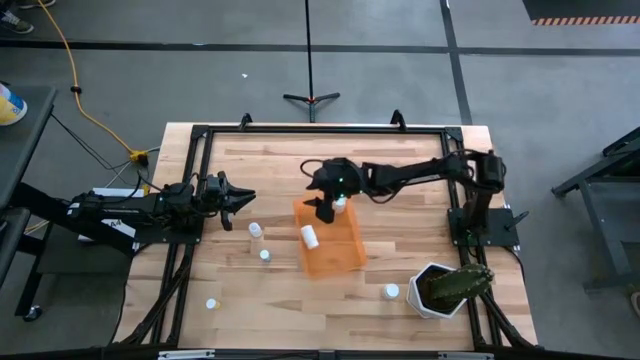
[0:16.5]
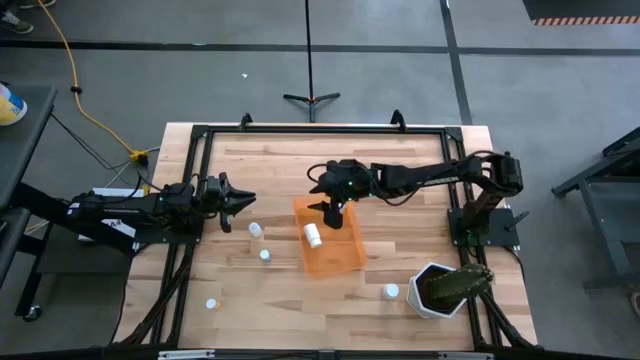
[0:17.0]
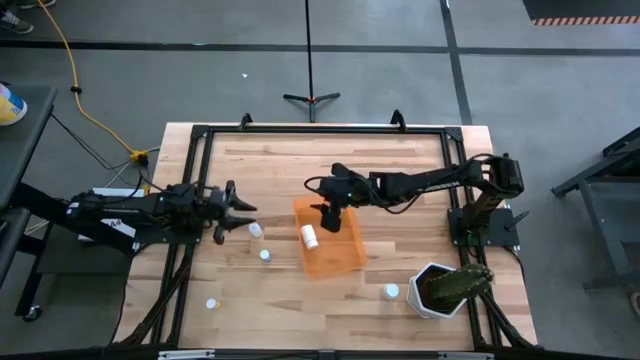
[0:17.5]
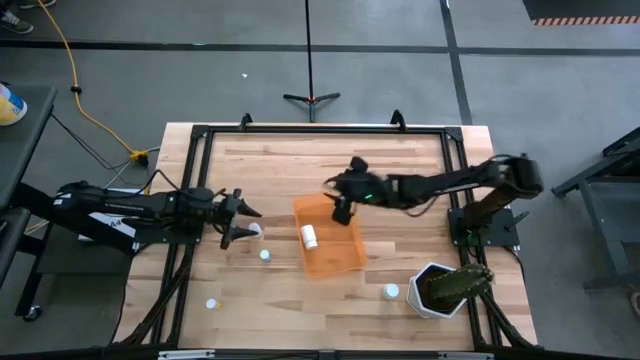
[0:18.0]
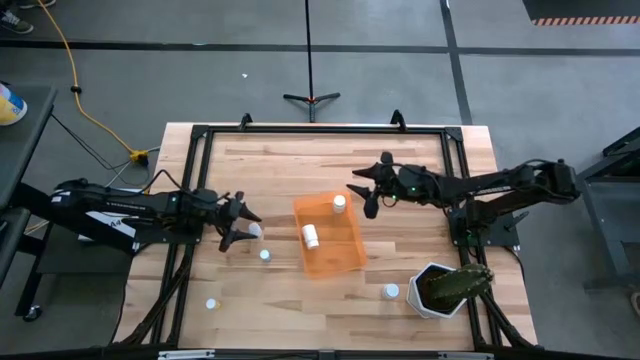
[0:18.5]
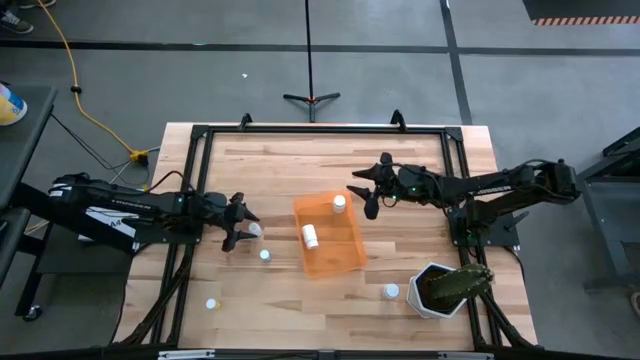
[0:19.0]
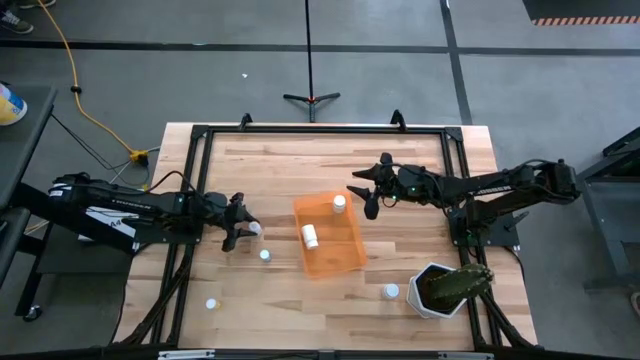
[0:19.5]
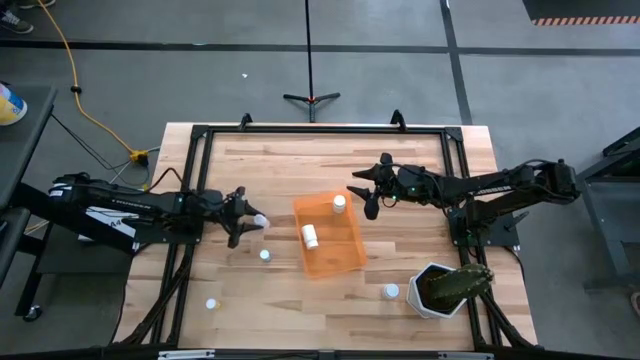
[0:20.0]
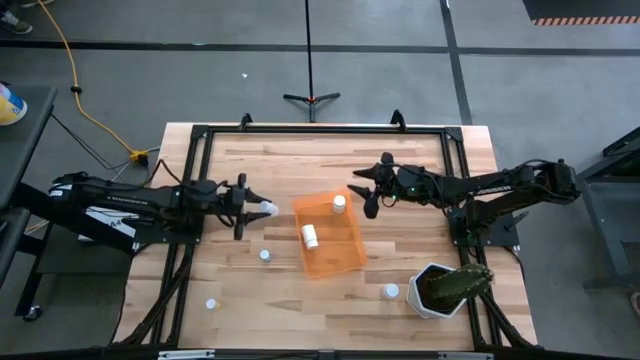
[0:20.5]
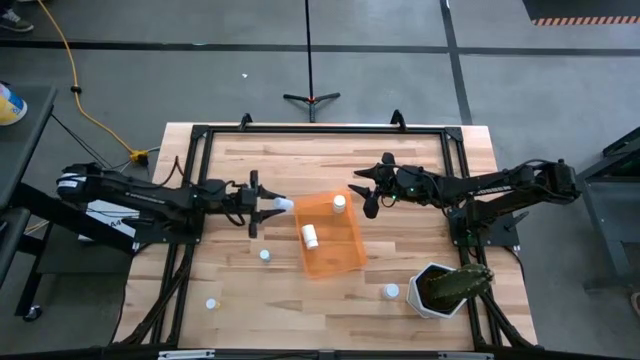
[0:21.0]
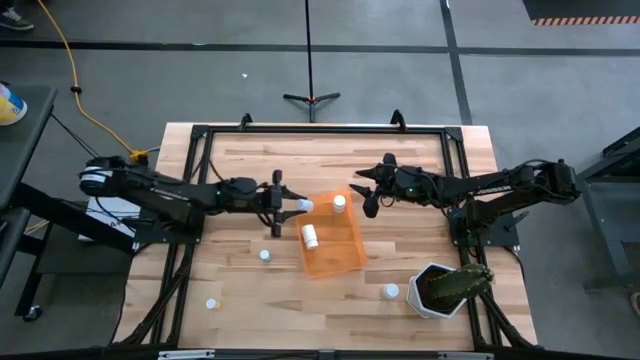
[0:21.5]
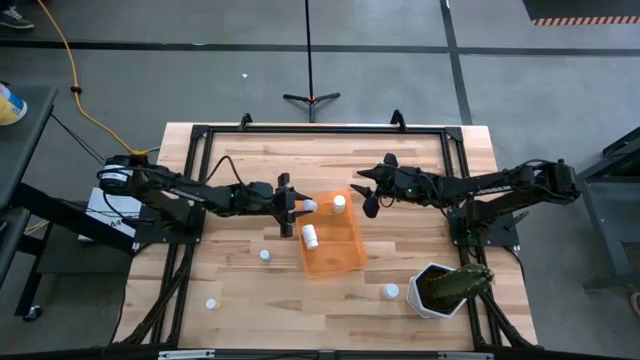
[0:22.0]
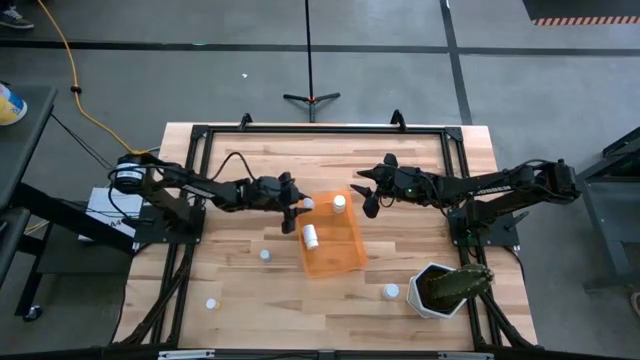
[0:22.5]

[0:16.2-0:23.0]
Task: Pick and place pill bottles into a basket
Put the small white pill bottle into the bin

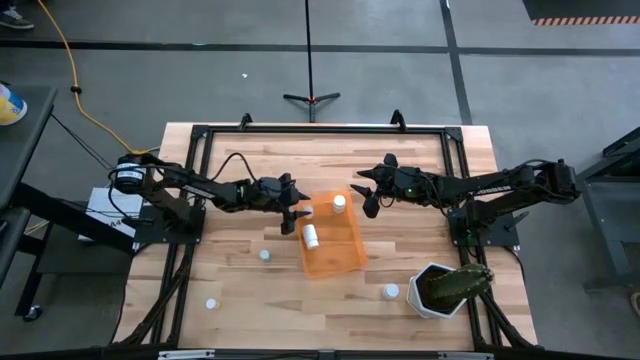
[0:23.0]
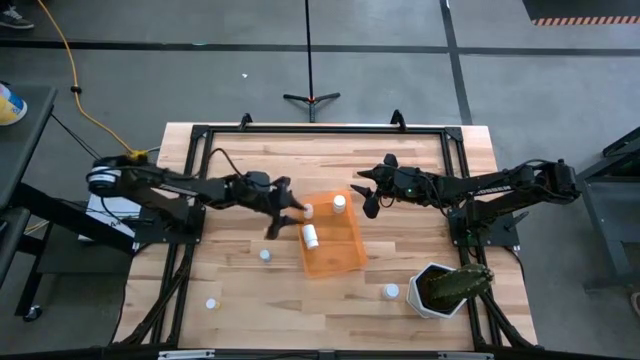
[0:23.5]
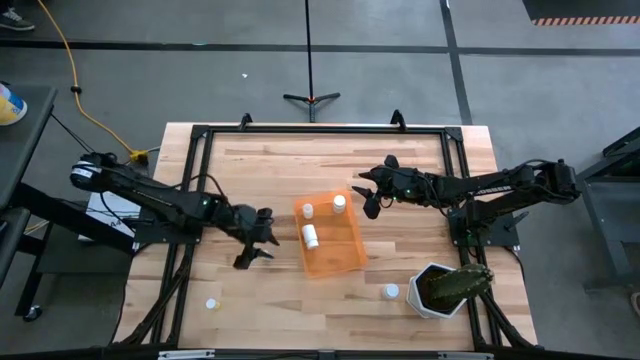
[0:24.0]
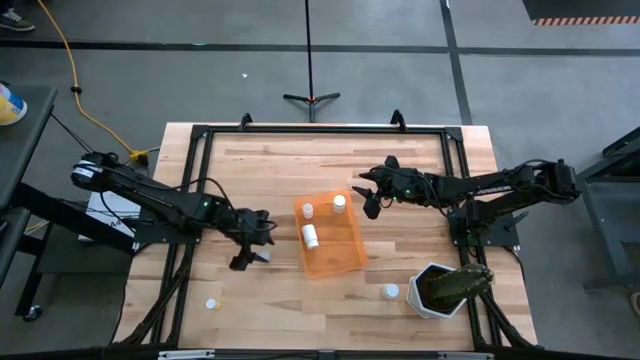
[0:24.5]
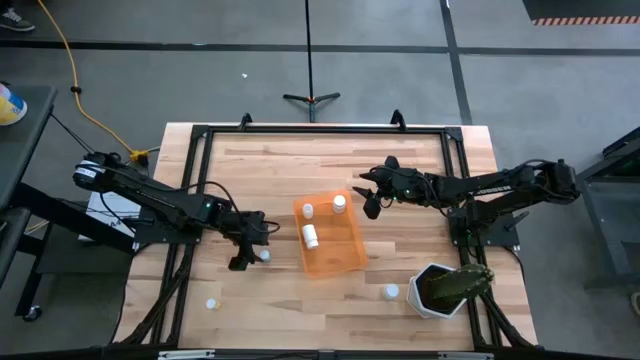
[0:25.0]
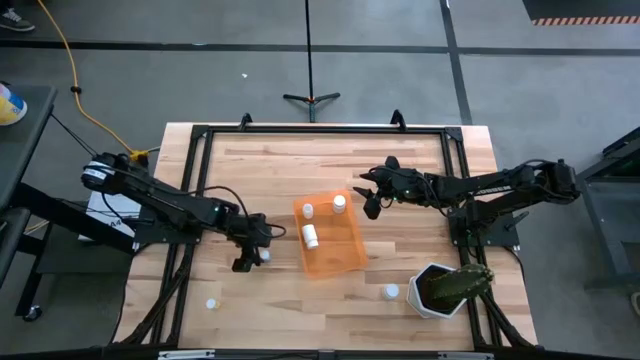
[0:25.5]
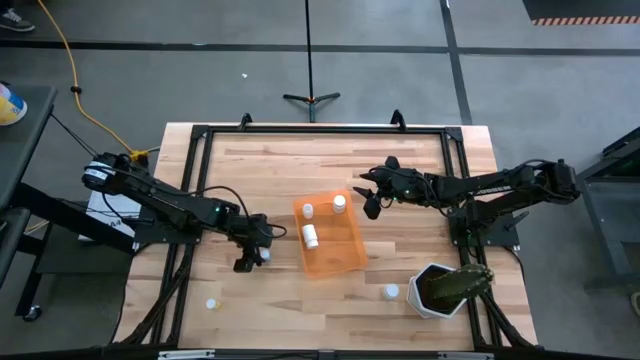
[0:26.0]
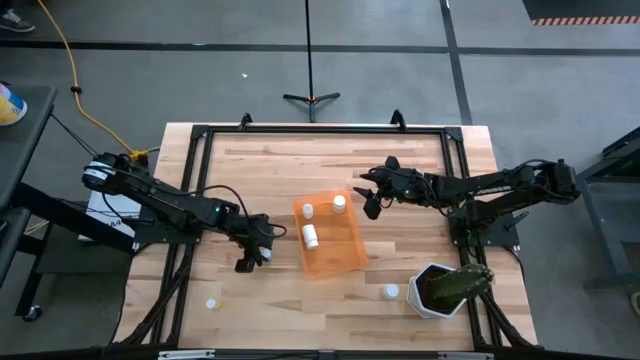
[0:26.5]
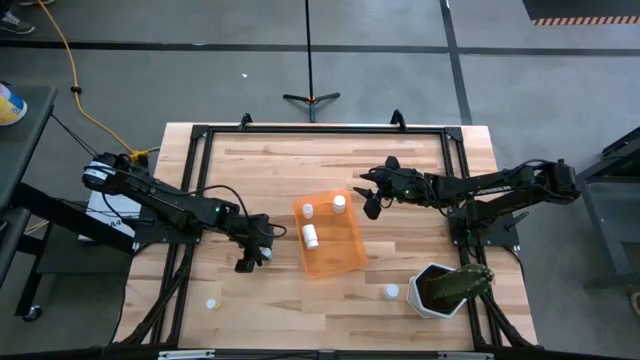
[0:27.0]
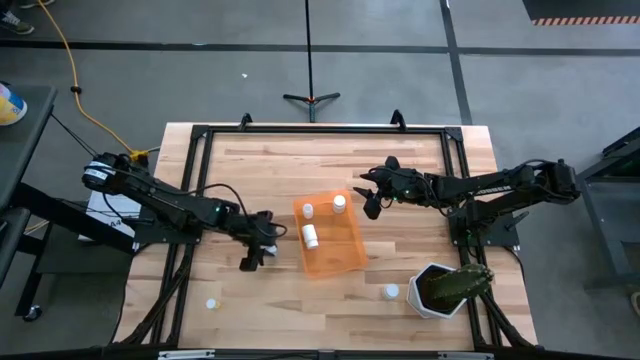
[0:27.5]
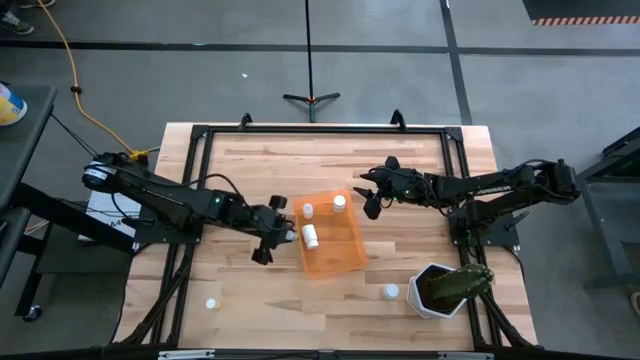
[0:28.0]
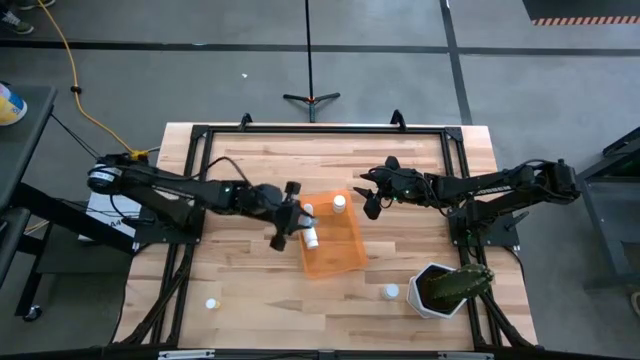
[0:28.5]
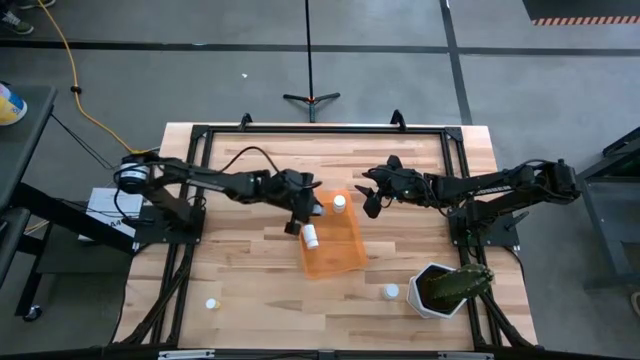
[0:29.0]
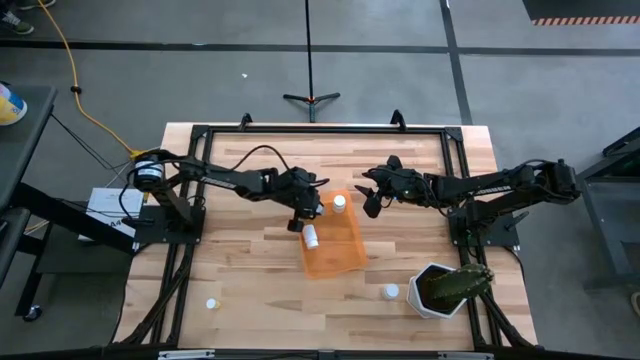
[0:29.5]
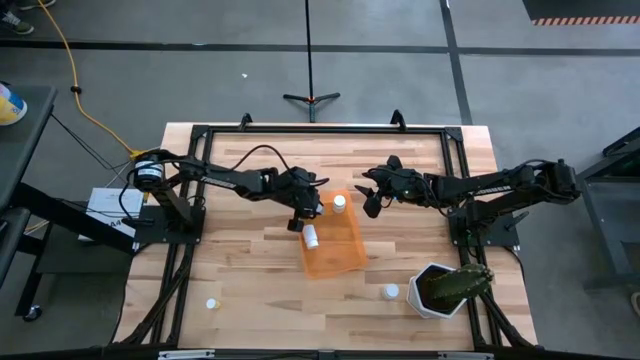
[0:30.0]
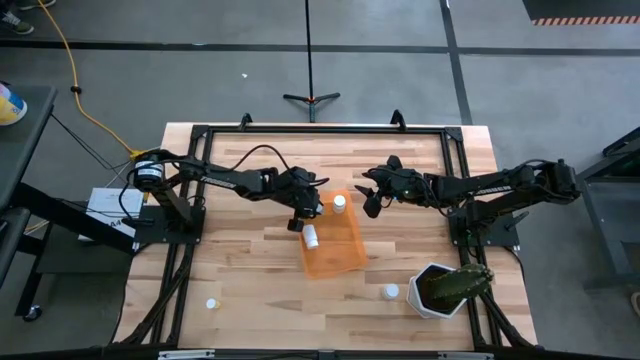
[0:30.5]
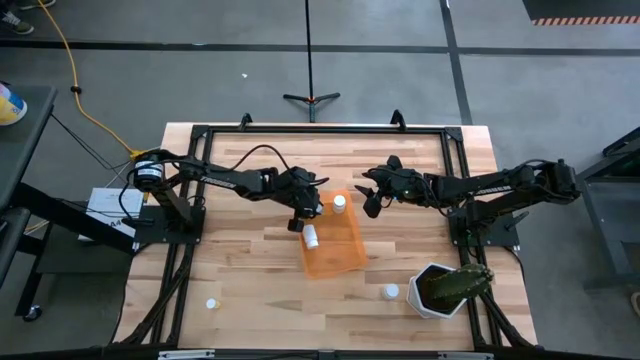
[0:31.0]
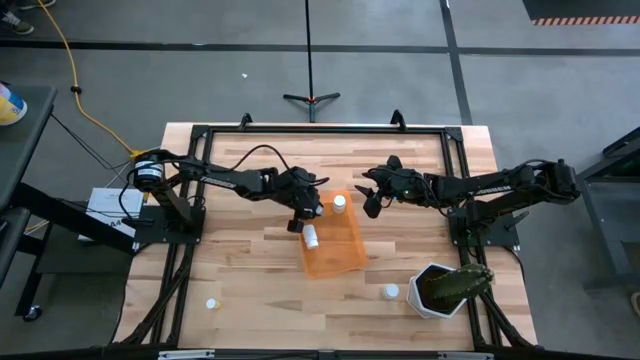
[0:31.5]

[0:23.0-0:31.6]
Put the blue pill bottle into the bin

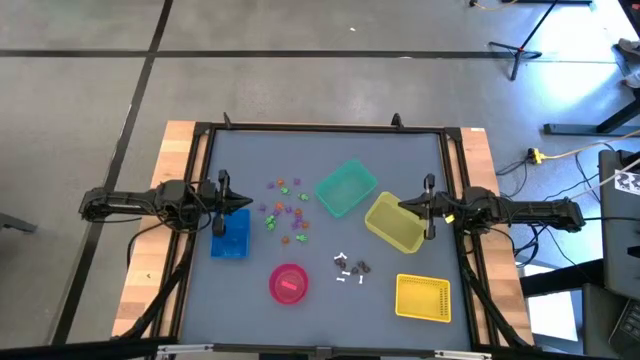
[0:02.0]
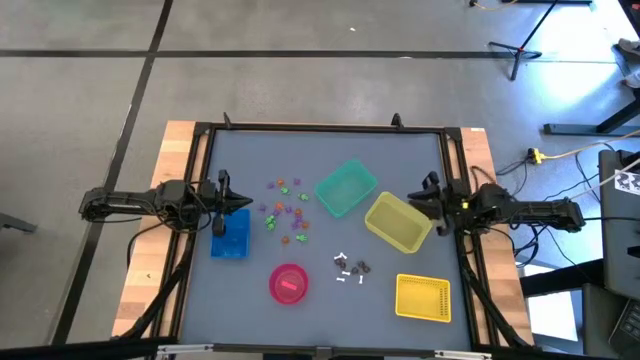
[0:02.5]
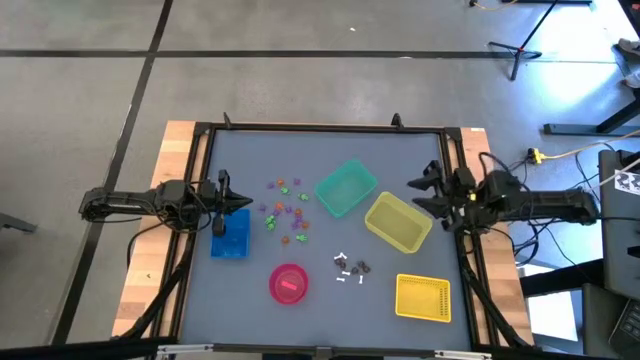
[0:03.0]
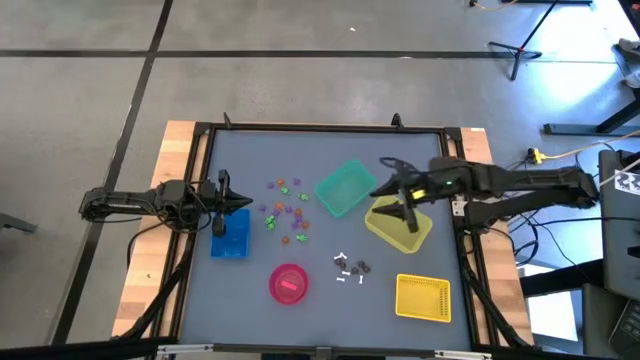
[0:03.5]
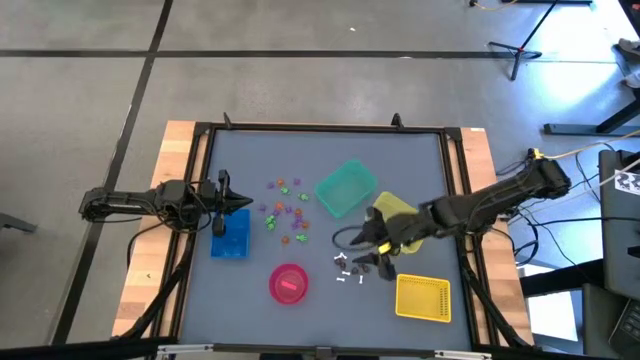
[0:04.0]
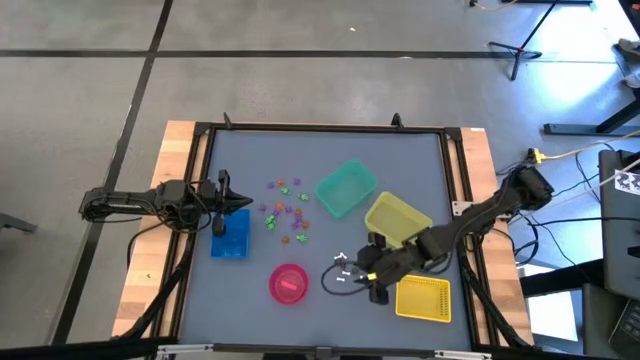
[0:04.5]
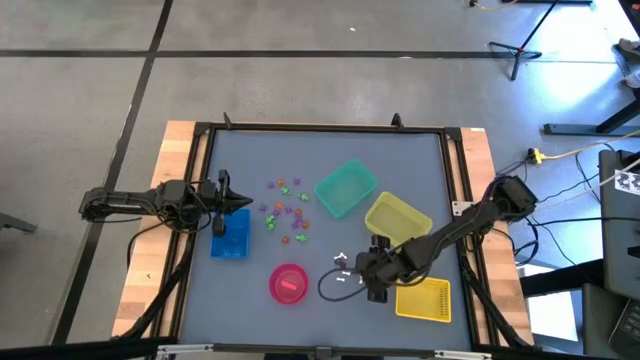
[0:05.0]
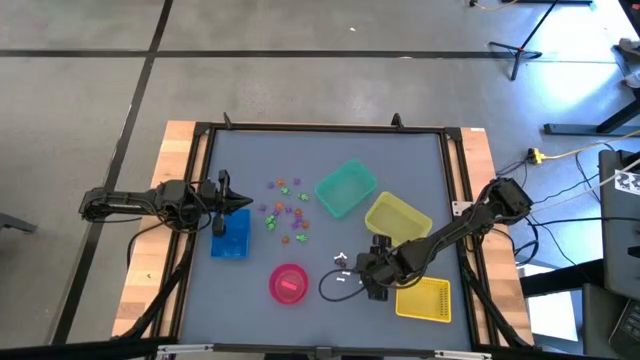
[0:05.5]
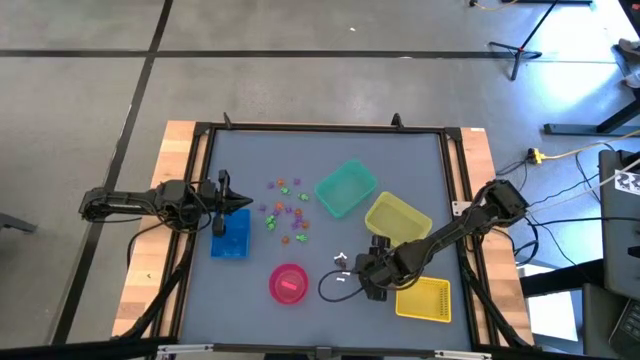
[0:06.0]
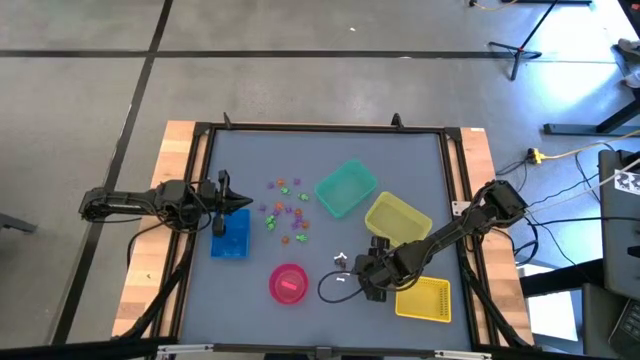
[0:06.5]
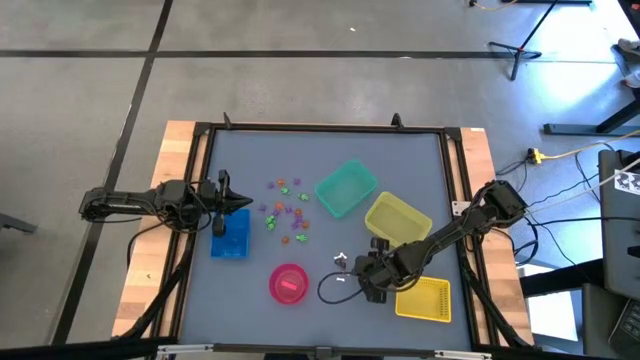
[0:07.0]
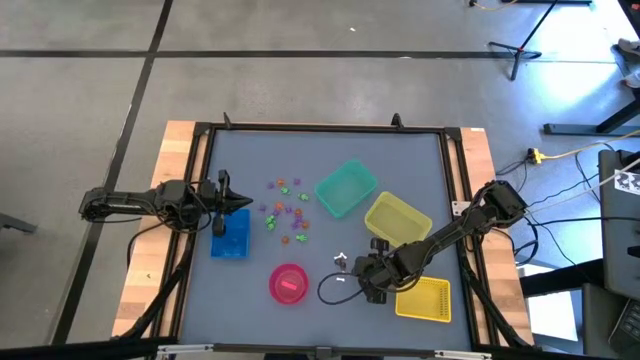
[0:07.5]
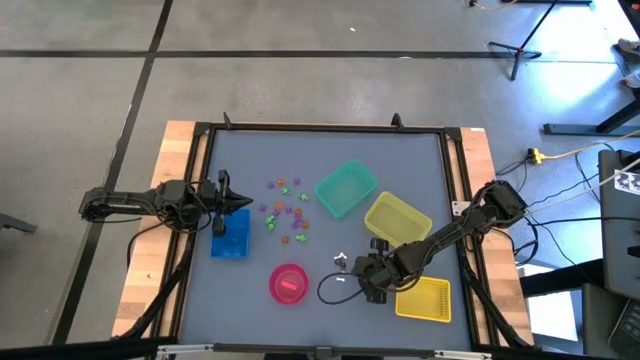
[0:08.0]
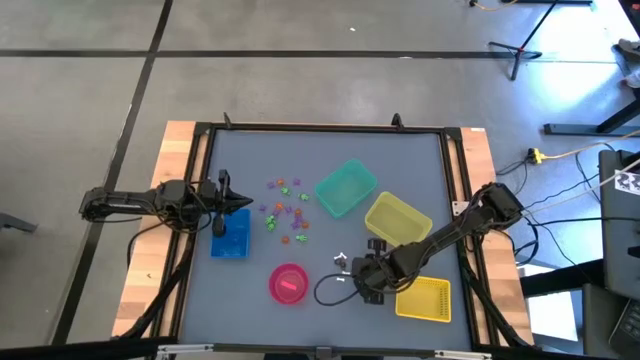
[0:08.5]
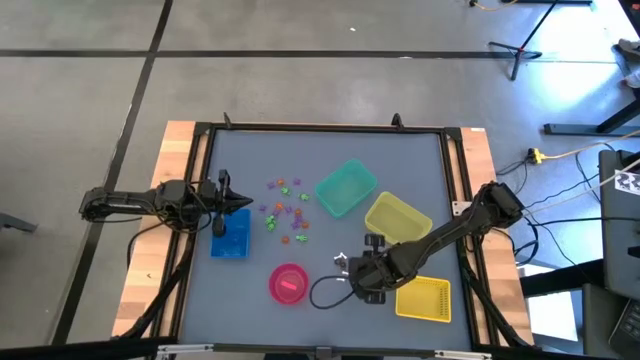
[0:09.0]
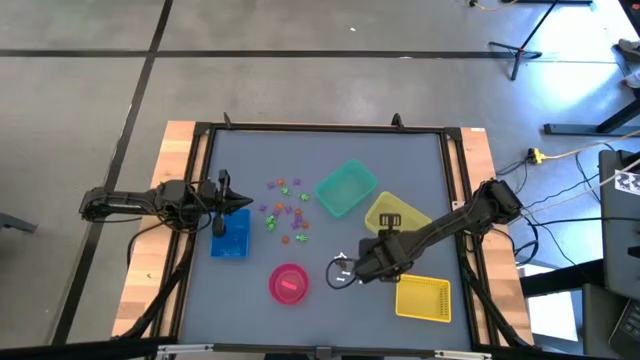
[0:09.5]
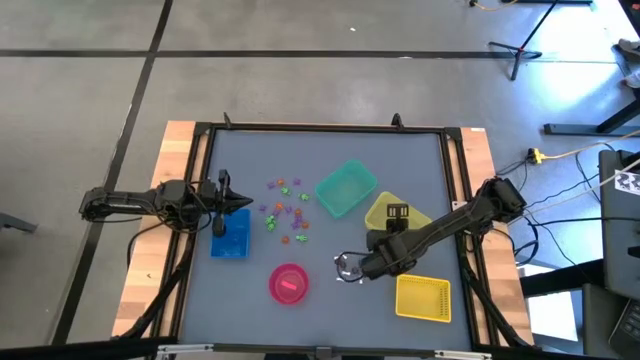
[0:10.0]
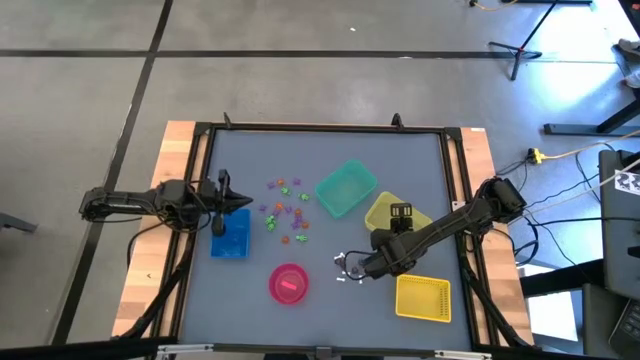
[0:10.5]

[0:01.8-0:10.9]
Task: Sort Halloween decoration
Put the black skull toy into the light yellow bin
